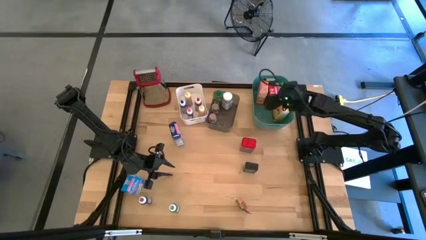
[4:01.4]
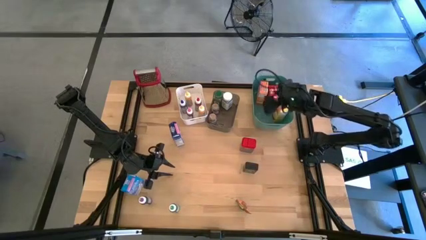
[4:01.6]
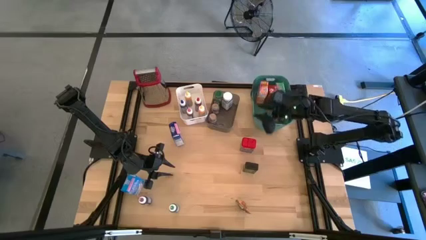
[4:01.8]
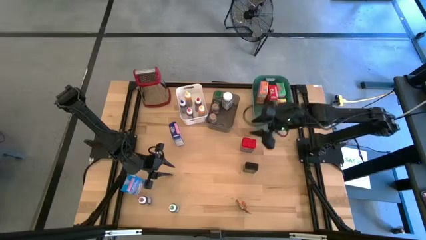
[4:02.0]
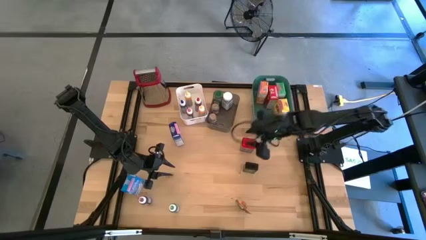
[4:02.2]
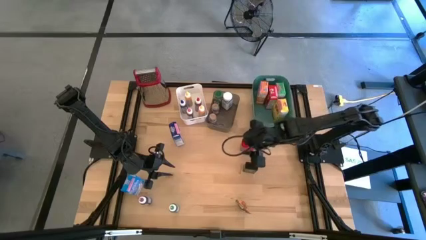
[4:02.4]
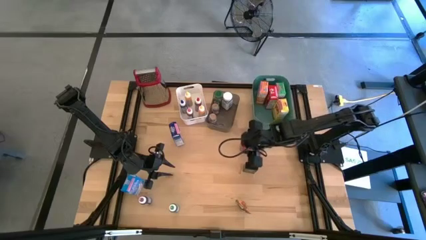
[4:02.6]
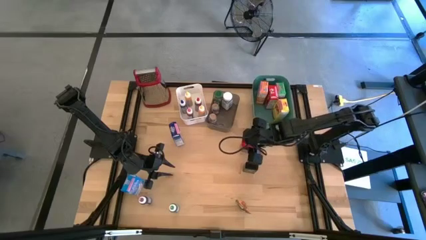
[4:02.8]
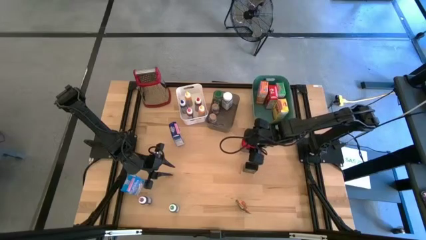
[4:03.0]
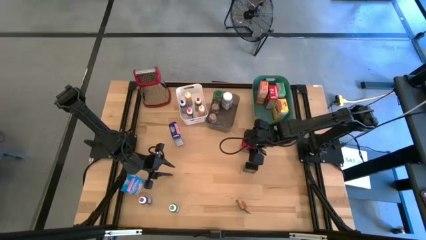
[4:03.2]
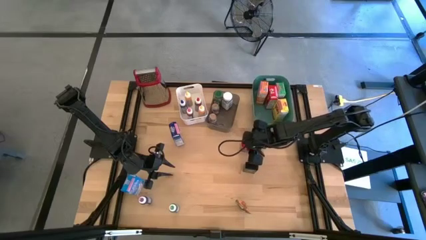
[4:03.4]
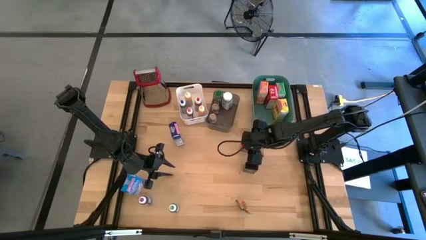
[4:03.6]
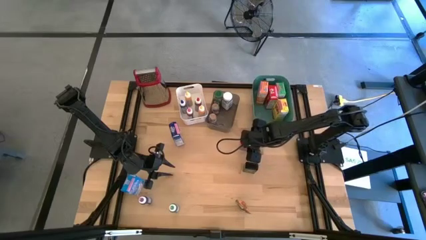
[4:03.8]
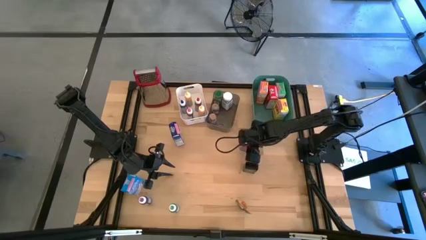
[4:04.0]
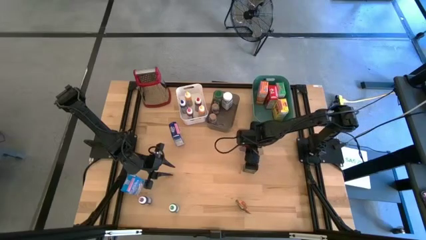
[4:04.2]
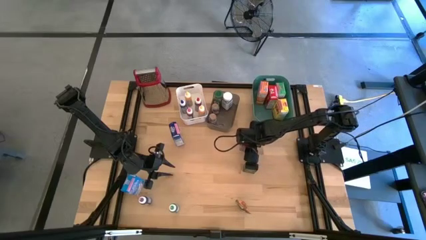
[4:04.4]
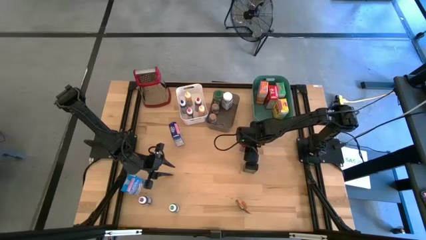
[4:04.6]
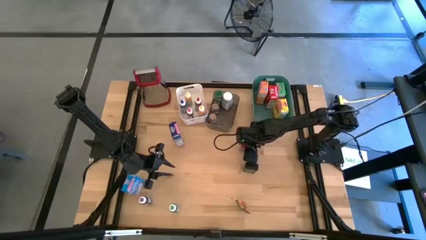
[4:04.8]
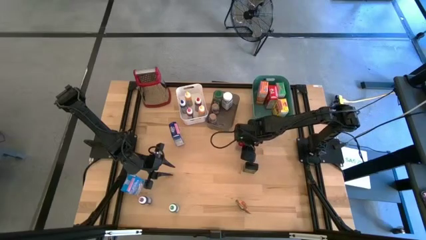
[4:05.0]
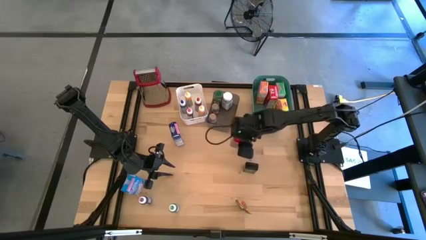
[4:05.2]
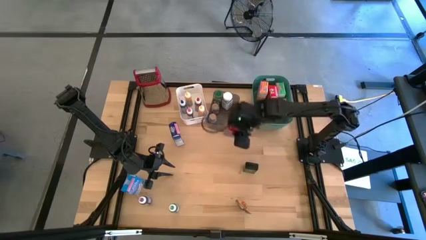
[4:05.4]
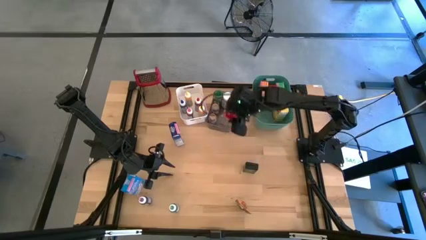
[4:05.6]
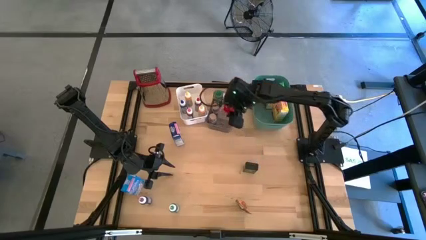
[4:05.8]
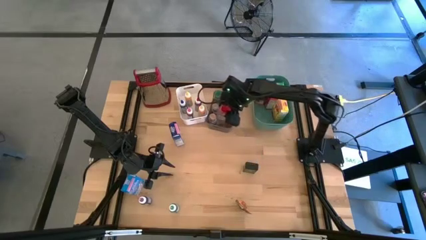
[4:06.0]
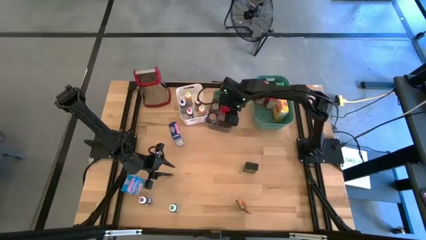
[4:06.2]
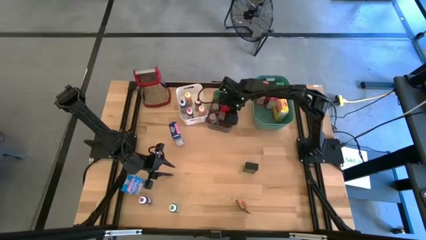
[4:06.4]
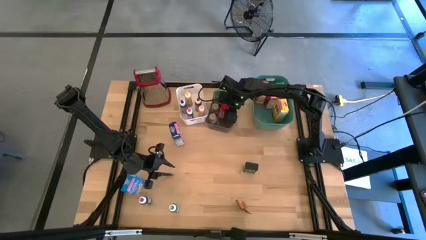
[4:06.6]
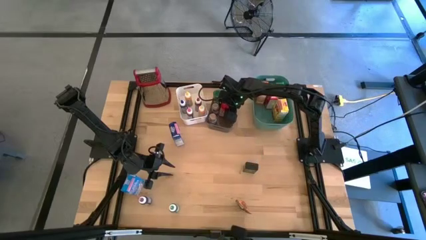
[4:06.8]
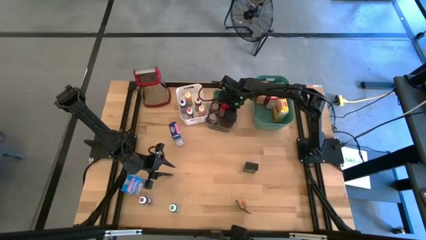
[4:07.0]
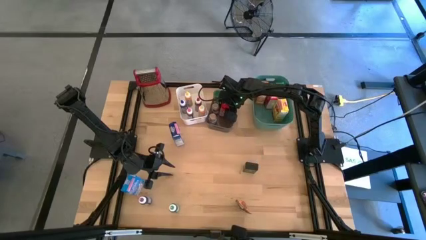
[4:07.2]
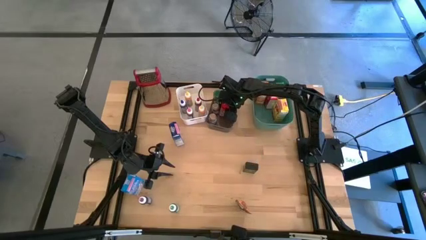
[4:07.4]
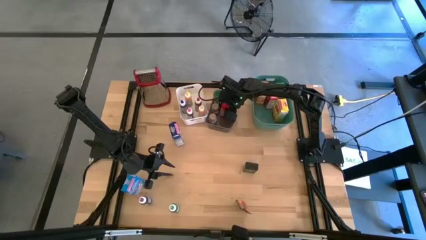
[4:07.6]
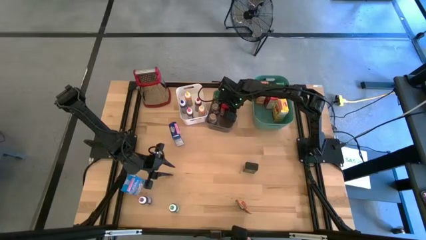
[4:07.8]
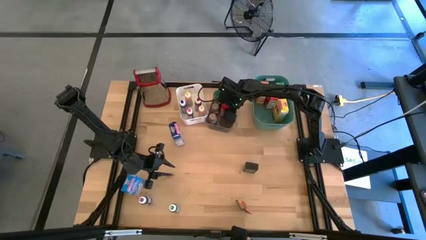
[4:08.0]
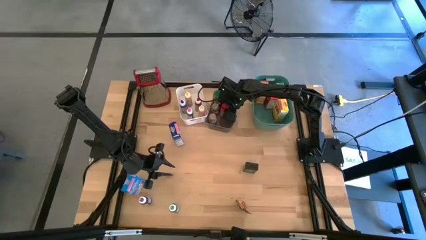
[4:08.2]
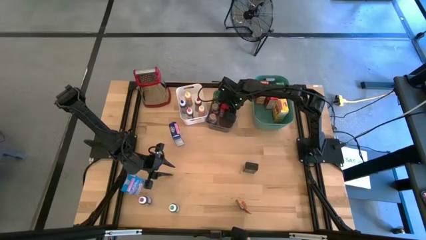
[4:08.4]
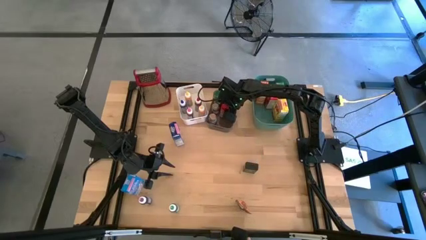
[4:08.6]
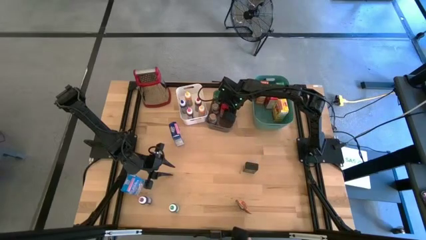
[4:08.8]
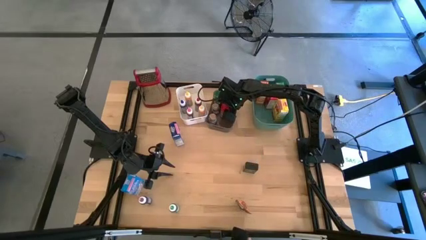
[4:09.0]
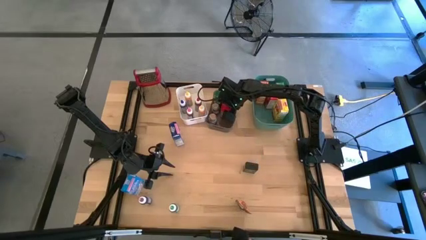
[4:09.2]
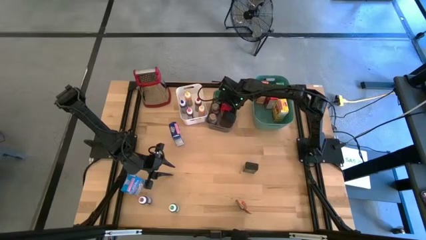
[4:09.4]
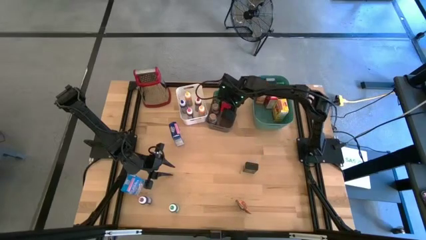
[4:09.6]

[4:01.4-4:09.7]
Task: Pick & Place Kitchen Items
Put the red spice can into the black bin

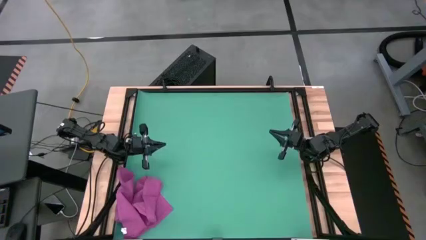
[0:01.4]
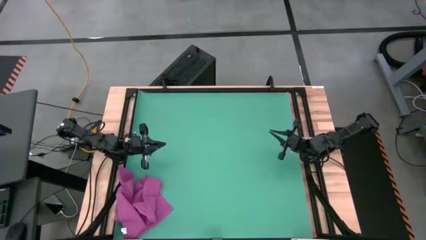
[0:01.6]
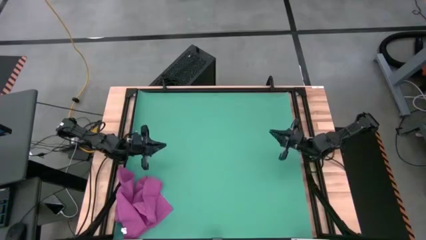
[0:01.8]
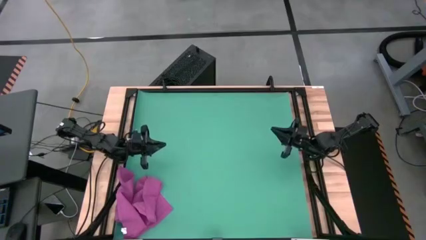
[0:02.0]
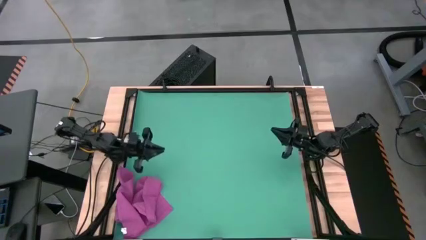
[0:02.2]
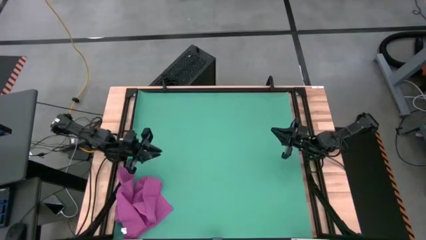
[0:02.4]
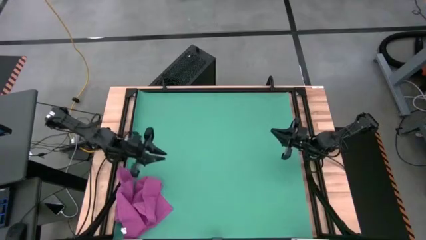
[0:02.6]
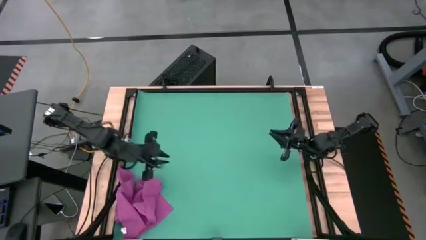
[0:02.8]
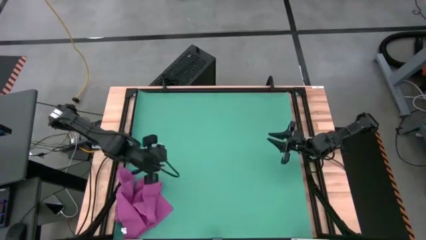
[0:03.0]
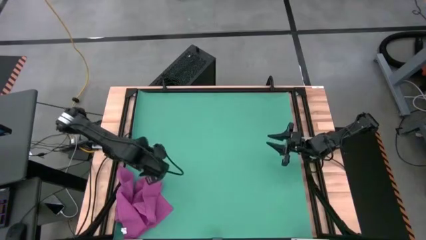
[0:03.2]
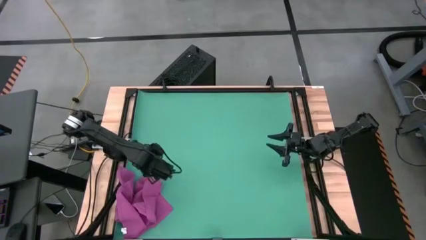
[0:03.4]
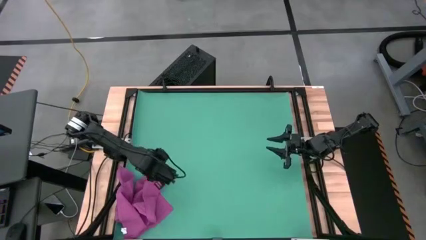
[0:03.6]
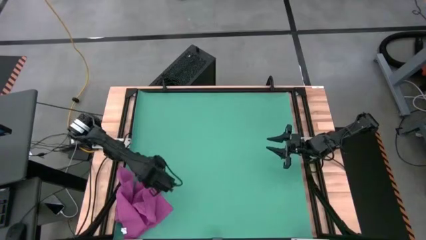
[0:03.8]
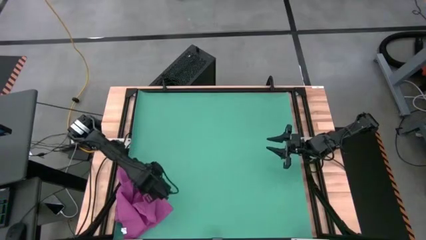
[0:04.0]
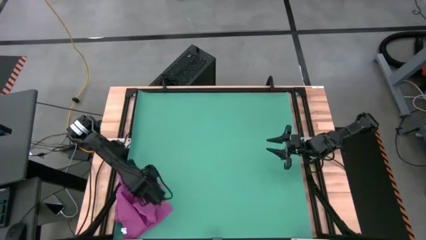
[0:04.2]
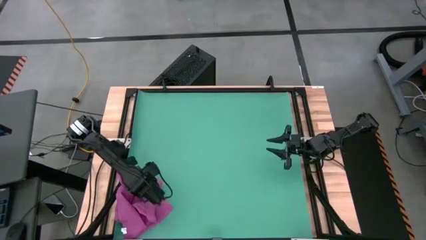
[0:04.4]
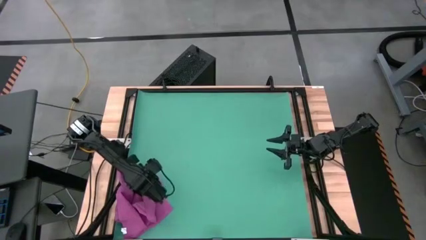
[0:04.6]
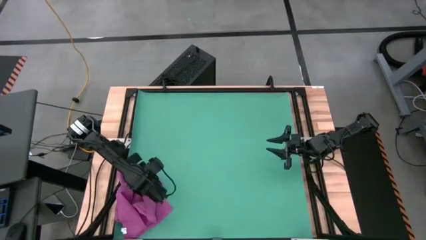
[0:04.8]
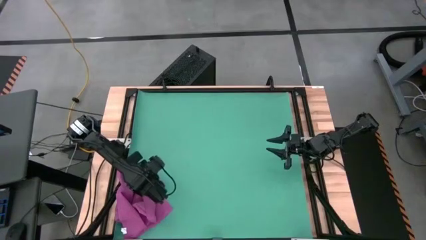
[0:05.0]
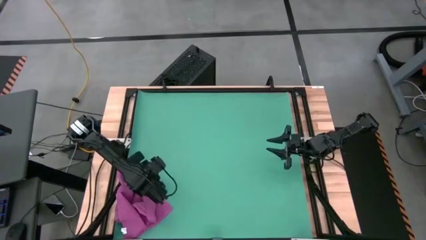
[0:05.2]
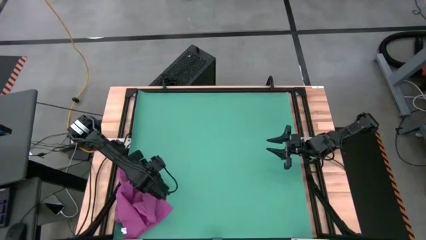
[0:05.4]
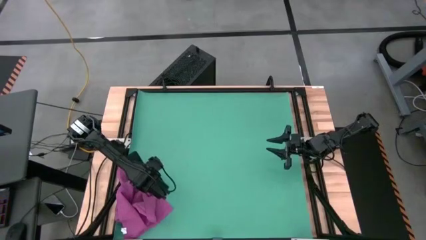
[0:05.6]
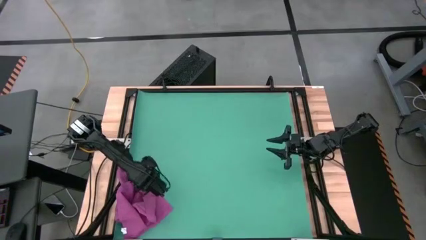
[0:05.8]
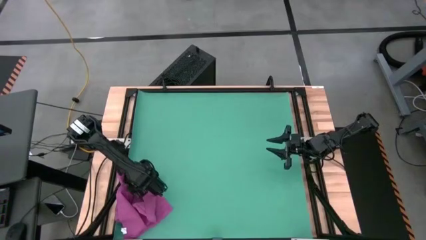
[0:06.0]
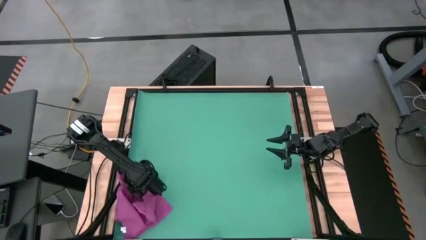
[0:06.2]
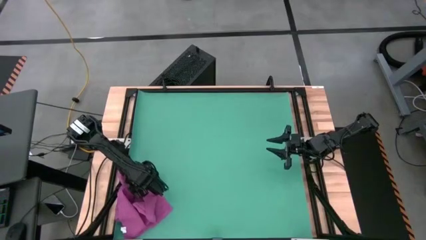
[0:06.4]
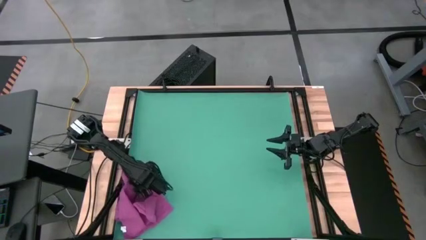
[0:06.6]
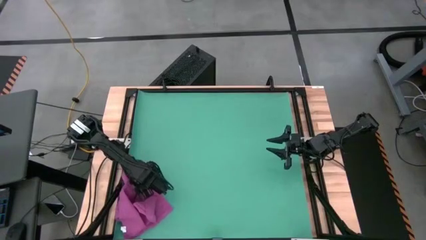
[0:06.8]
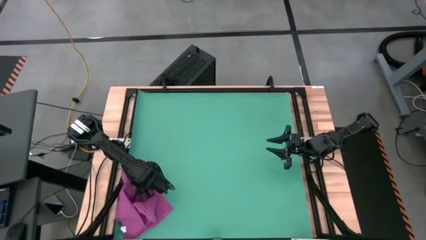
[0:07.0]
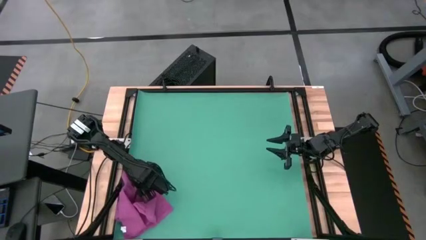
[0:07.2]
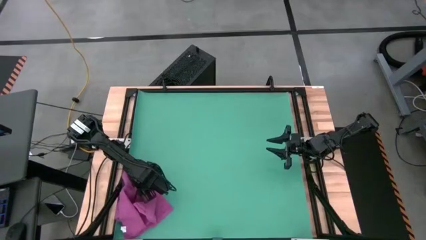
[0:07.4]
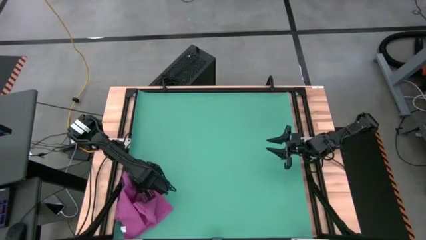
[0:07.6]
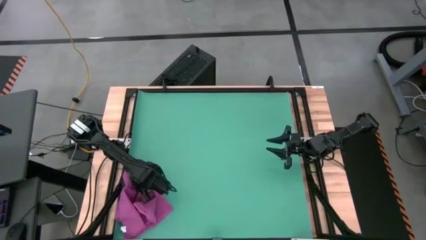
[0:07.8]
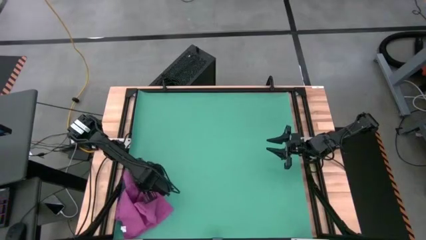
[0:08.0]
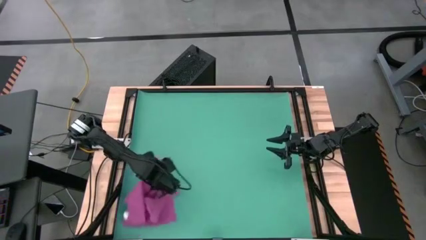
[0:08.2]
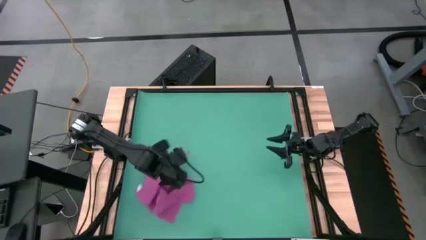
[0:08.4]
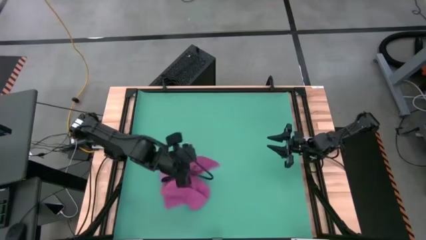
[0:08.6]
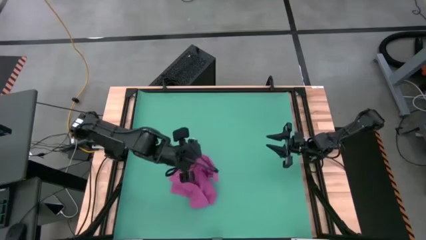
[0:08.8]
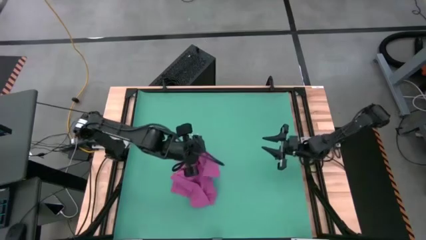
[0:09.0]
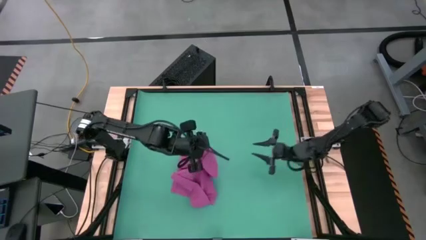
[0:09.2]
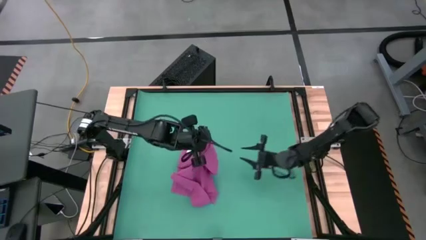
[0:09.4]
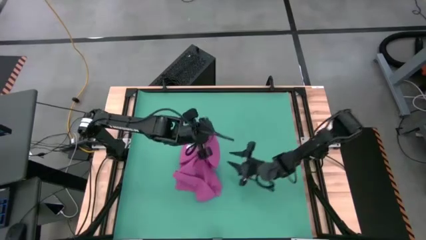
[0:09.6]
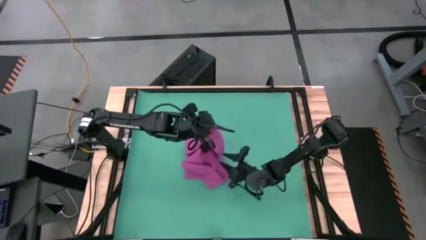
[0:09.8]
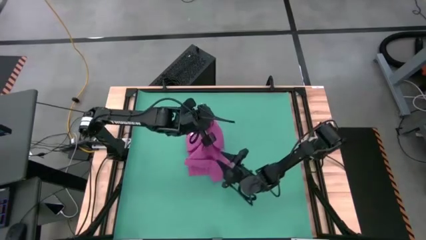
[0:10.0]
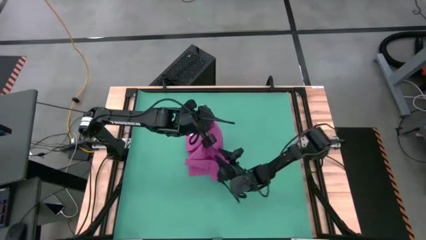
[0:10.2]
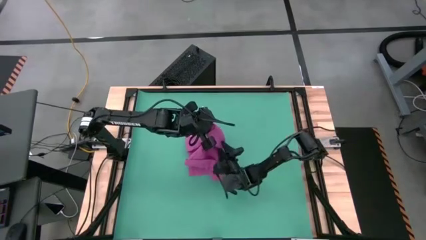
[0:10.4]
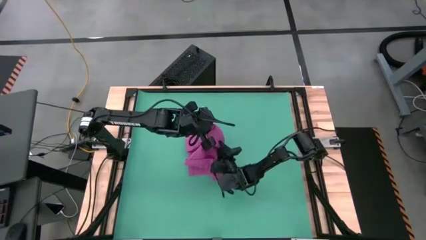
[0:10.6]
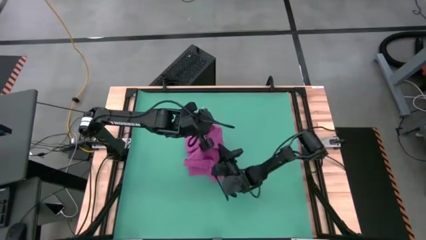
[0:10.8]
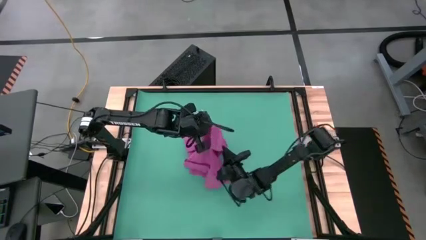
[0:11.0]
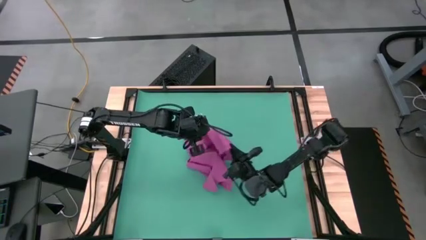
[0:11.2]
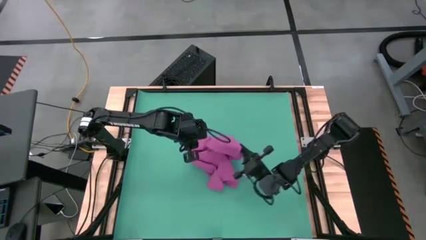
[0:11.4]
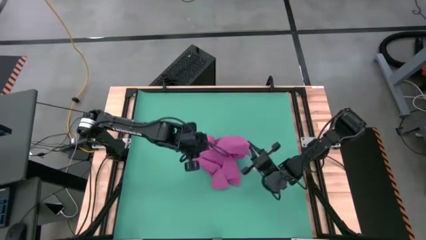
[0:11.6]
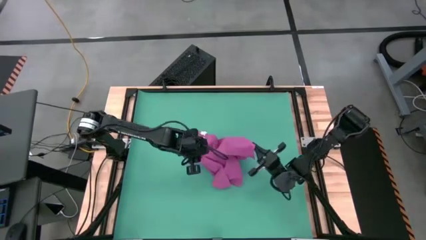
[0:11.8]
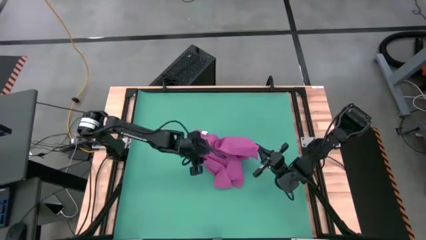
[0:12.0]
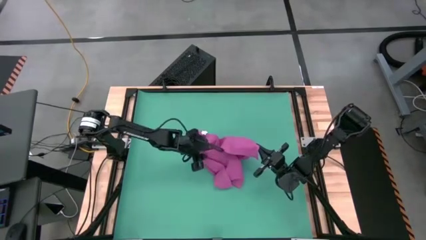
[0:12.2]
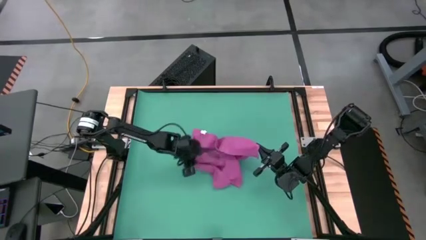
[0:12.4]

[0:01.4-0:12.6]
Task: Roll towel
Fold the violet towel
